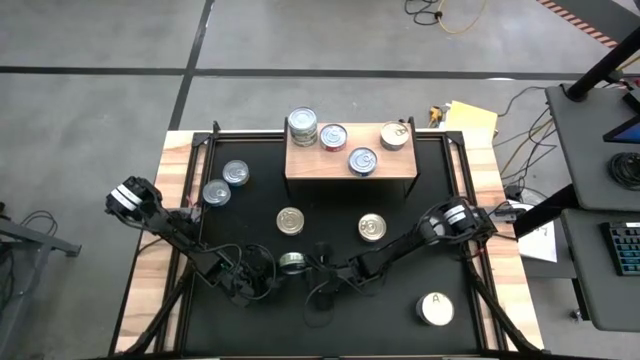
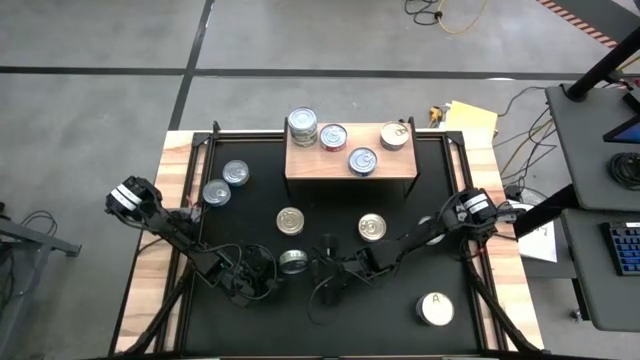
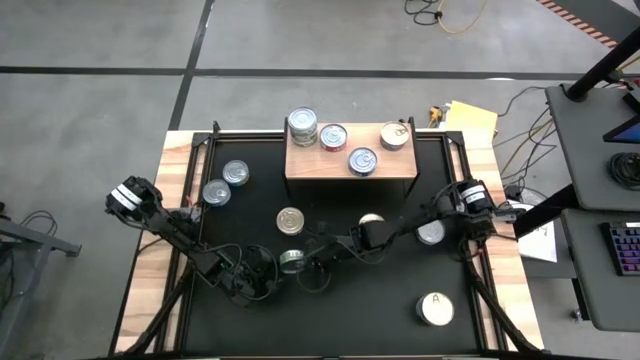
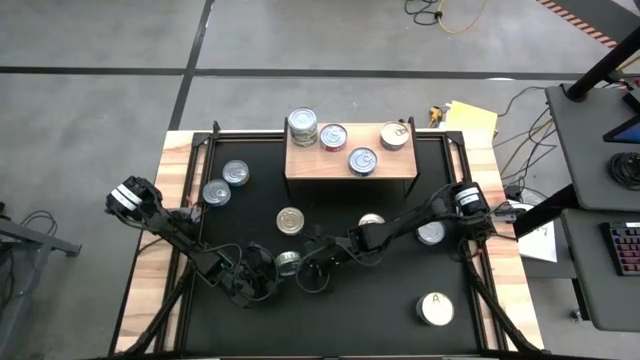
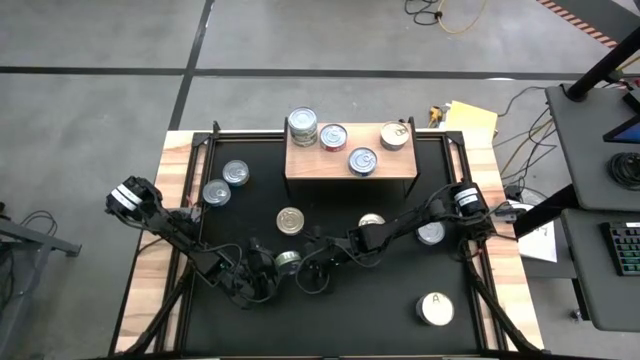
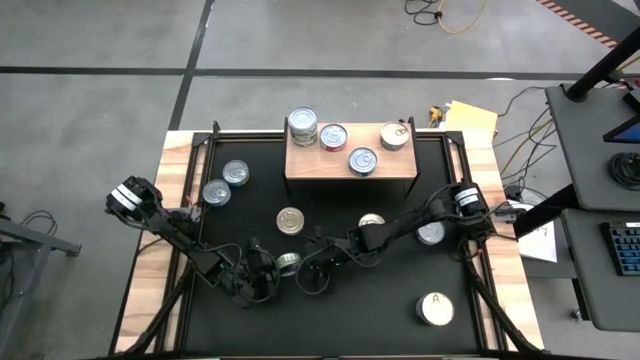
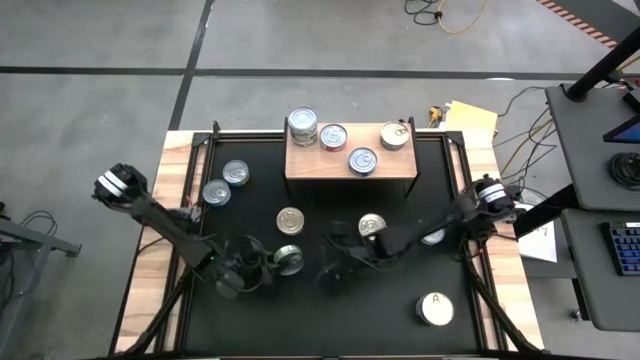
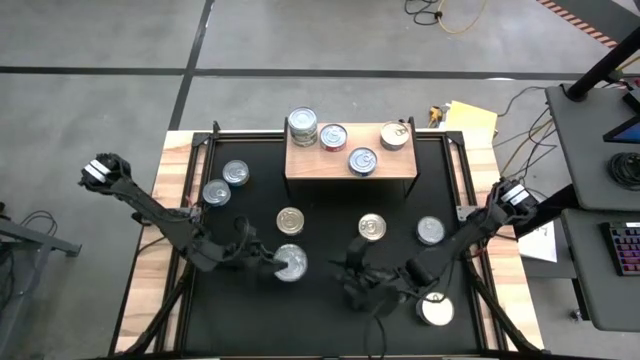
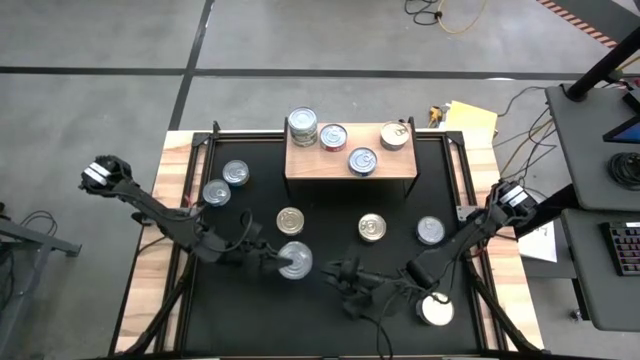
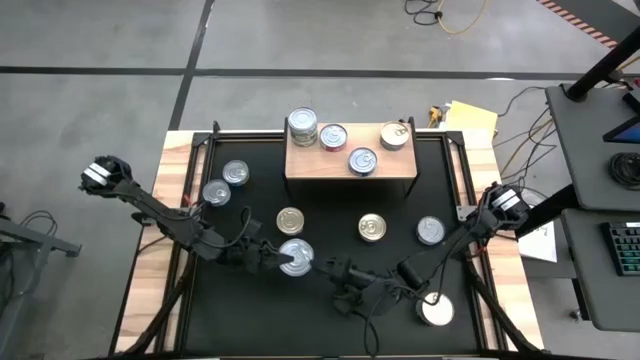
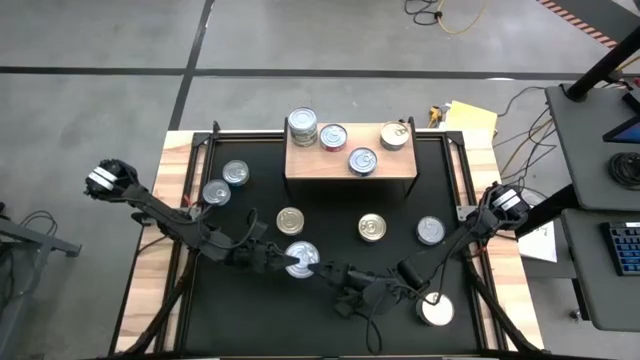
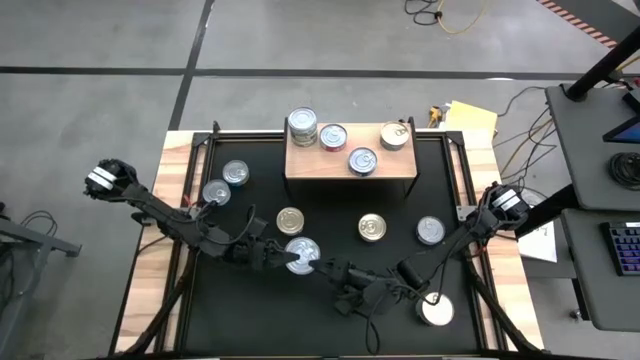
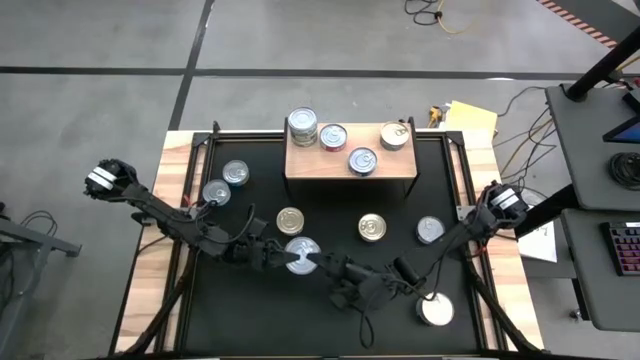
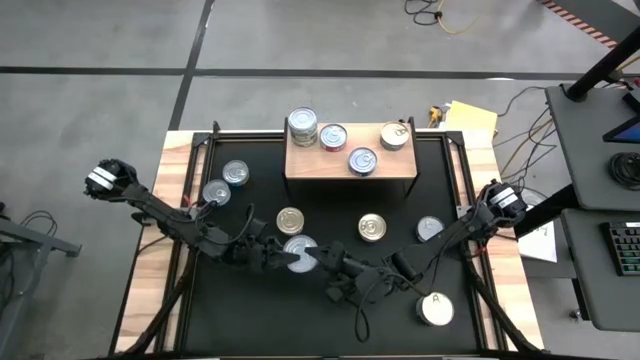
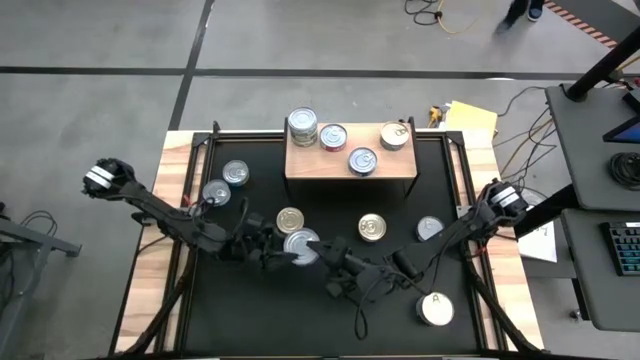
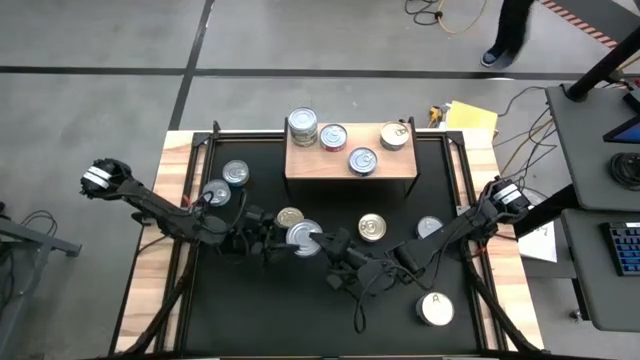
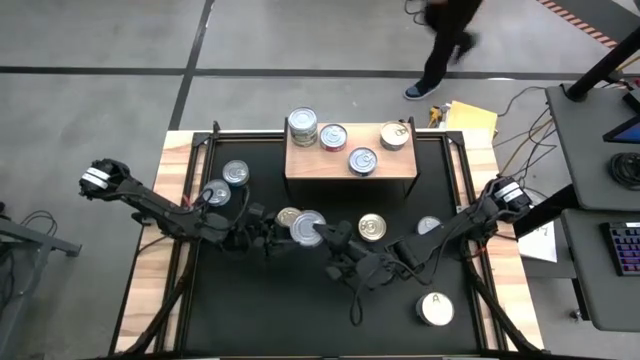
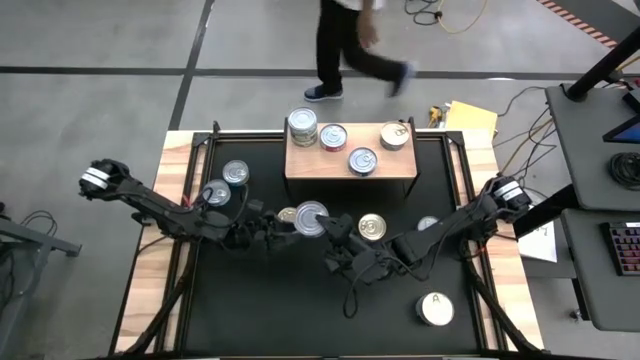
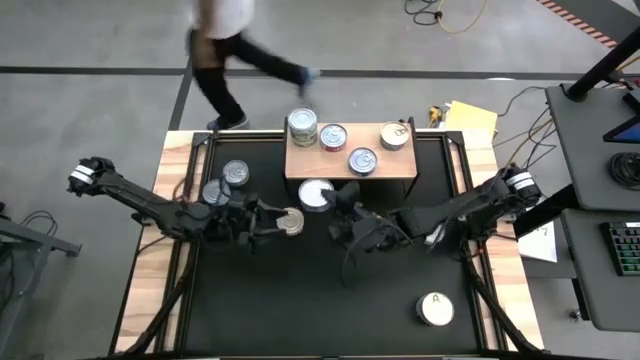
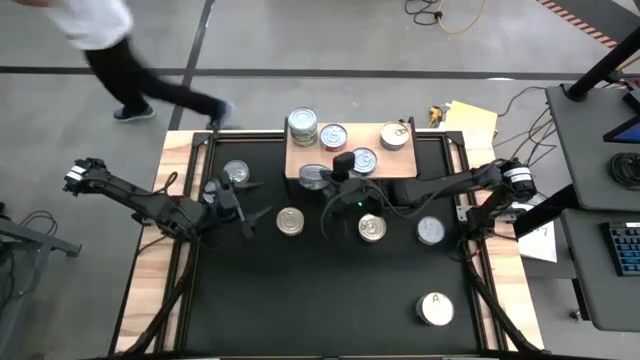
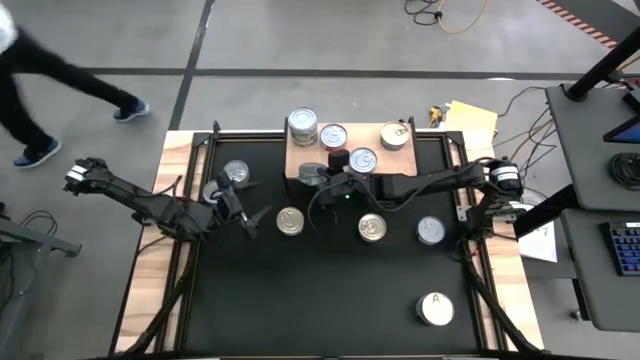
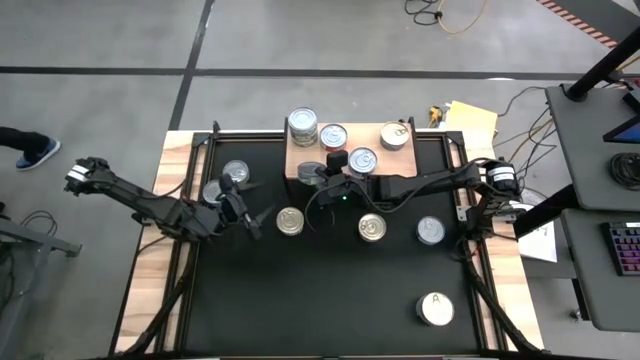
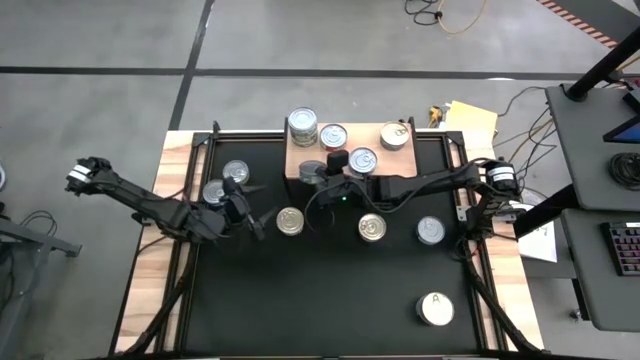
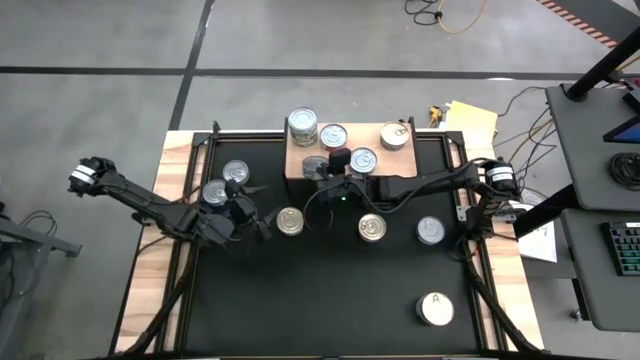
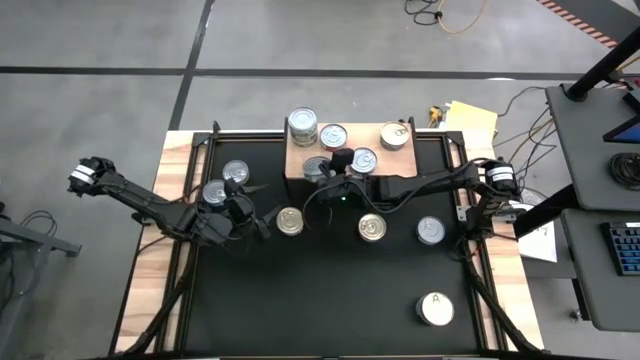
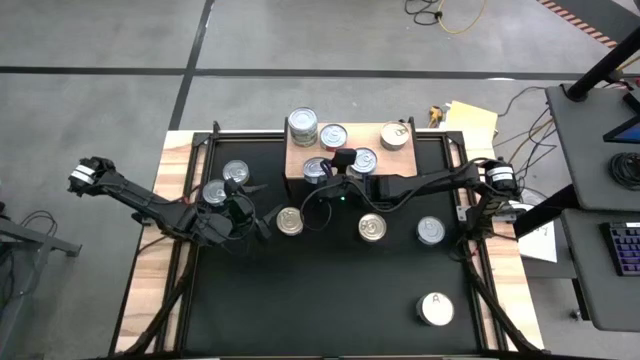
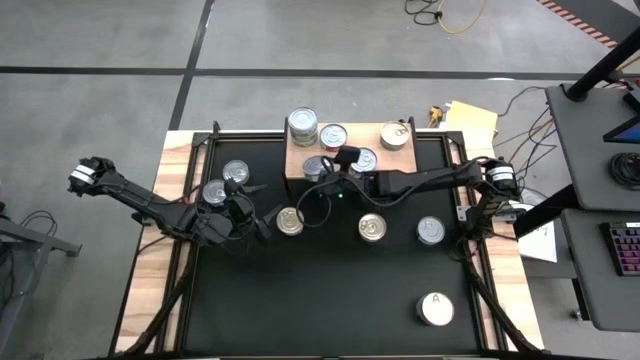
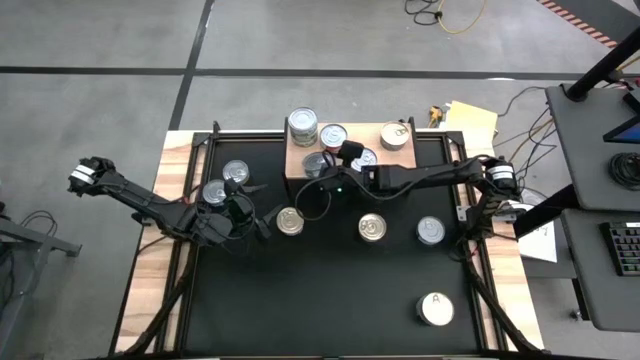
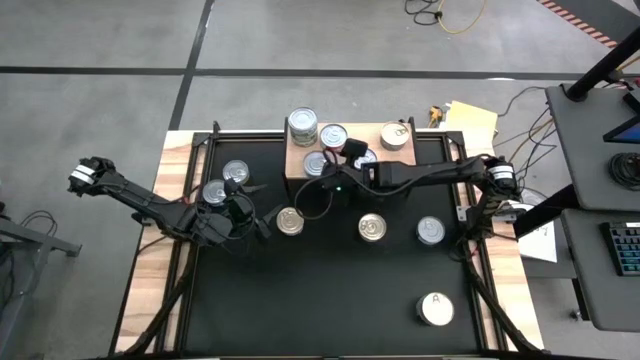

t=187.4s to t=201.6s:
Task: Stack canned seafood by type on shelf
Put the green tuna can on the shelf

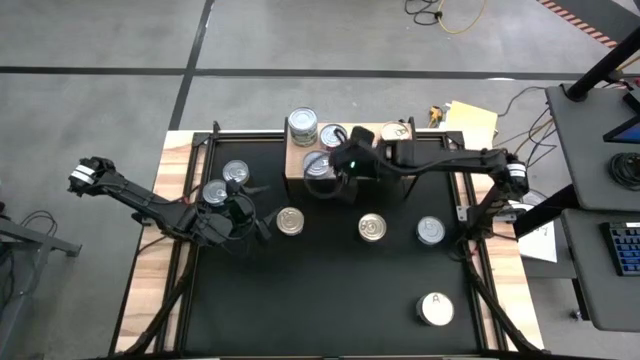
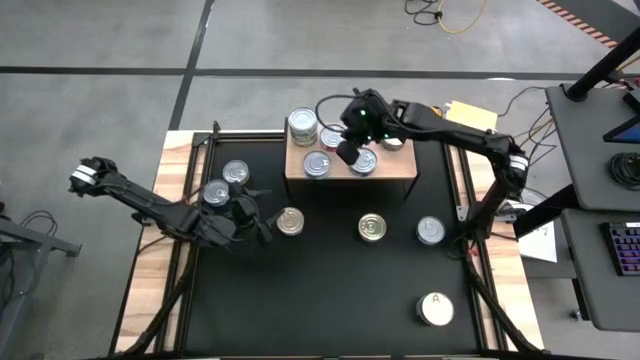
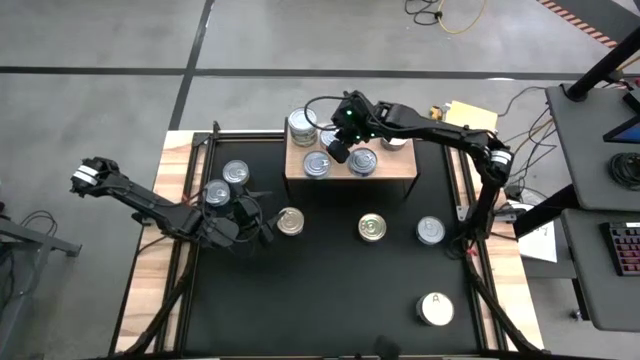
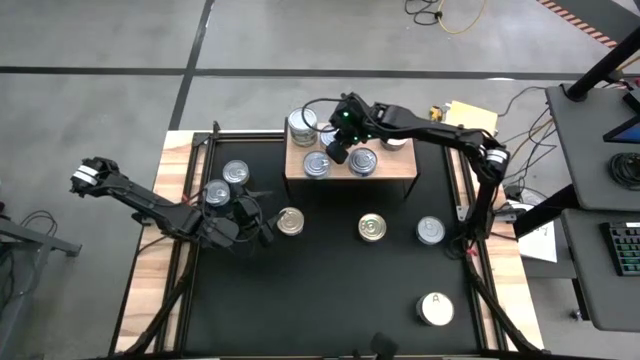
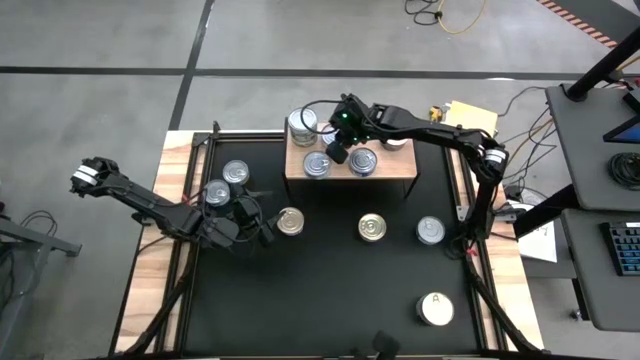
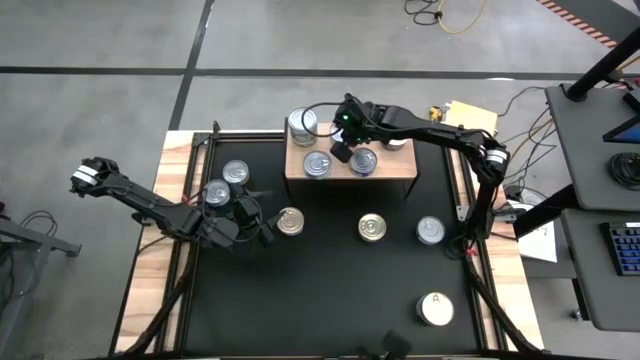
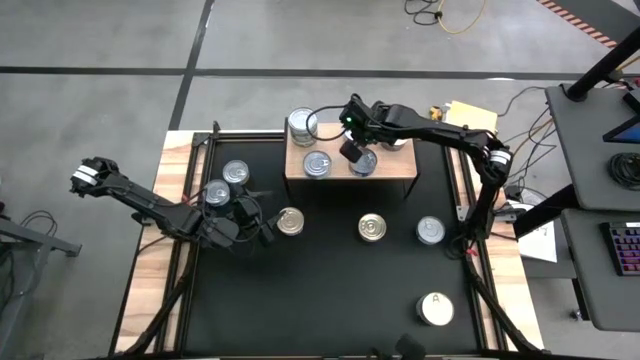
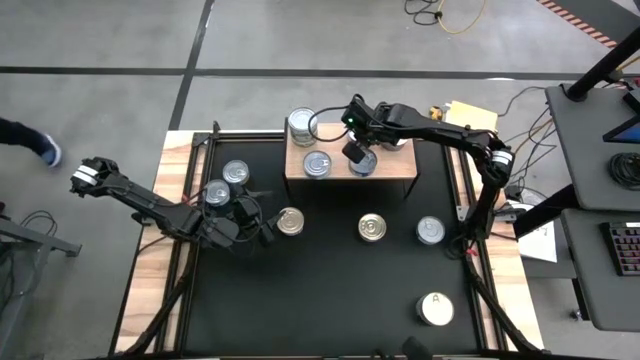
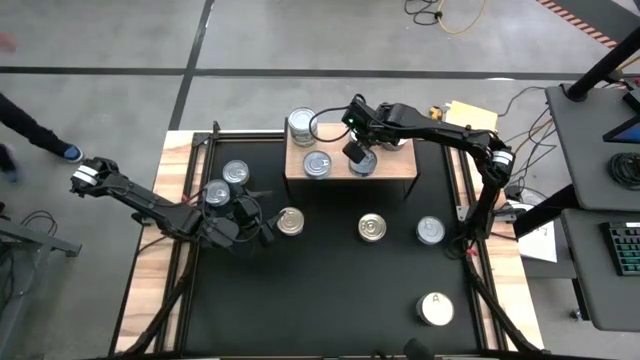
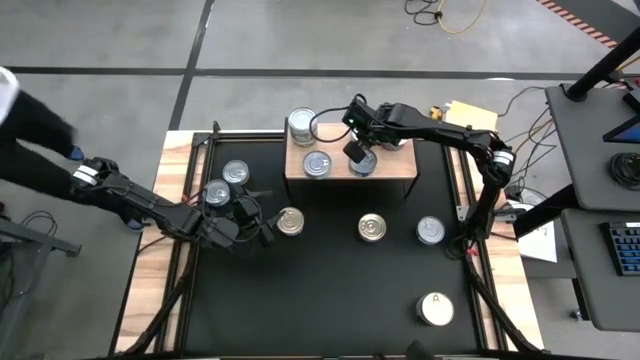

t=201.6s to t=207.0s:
Adjust the red tuna can on the shelf

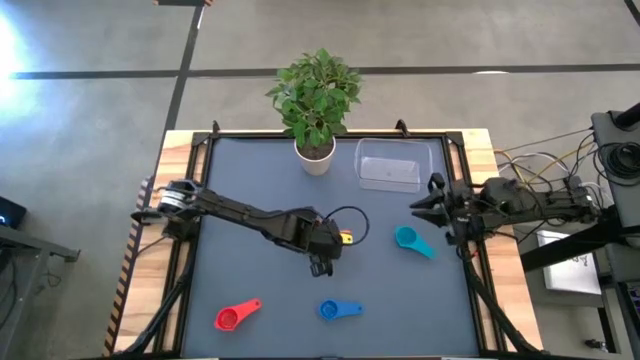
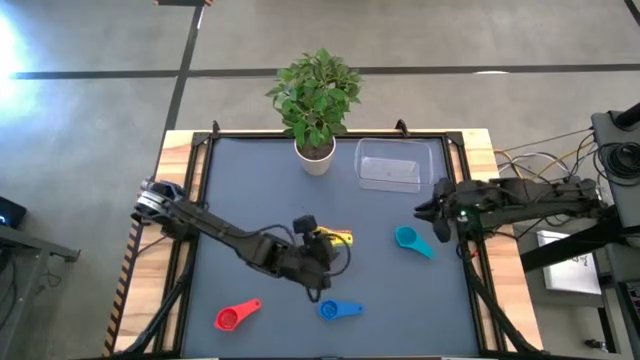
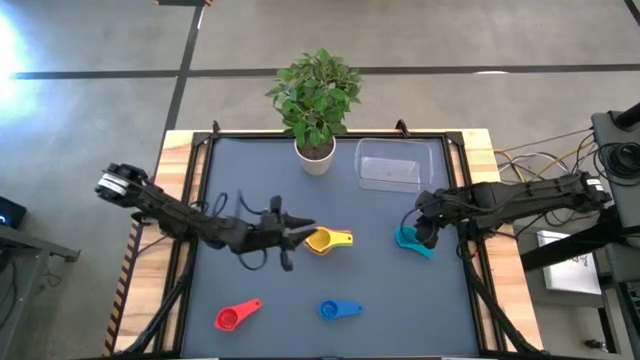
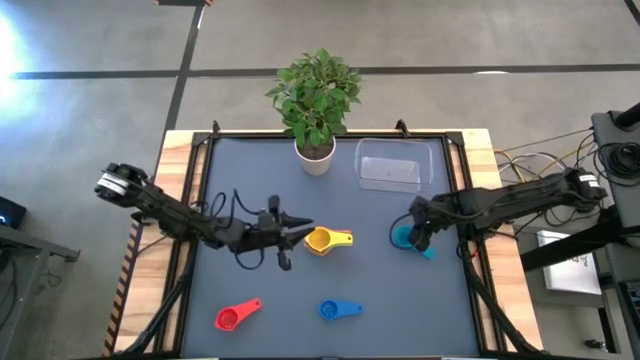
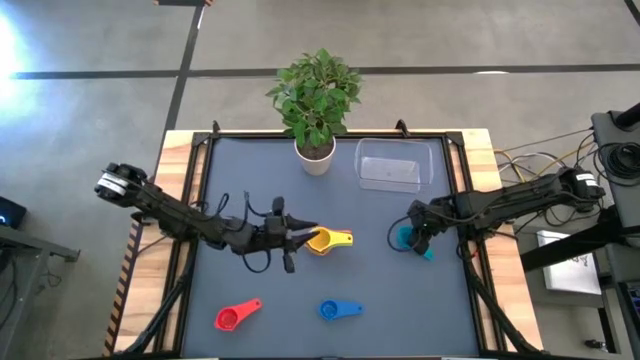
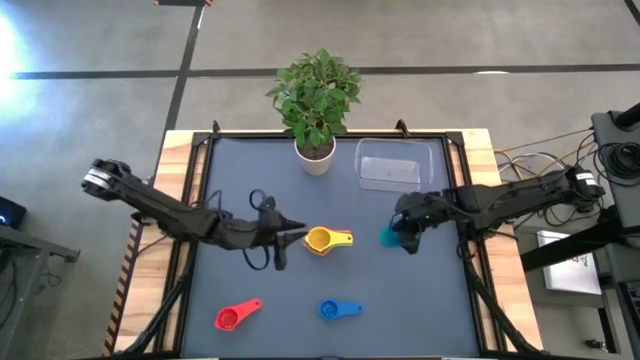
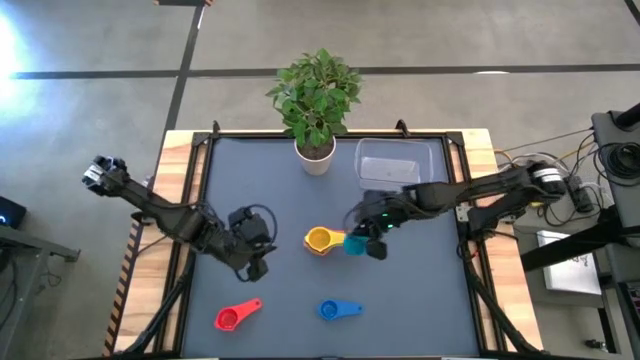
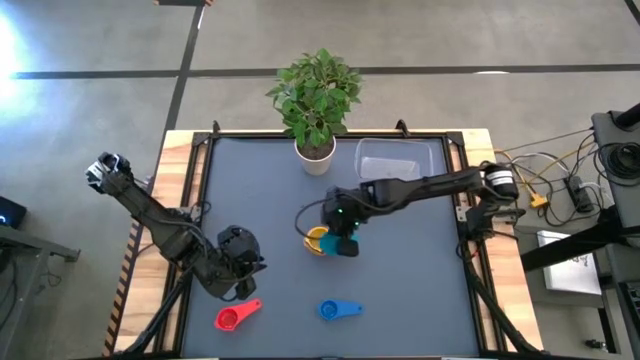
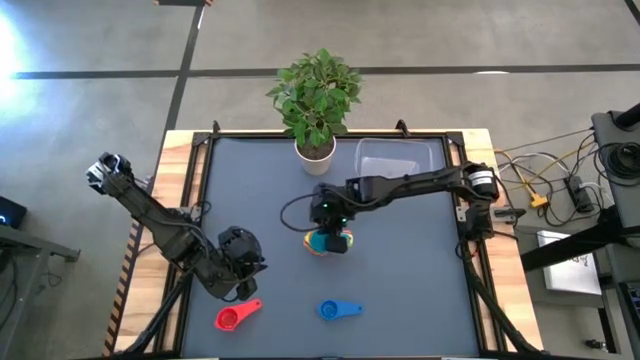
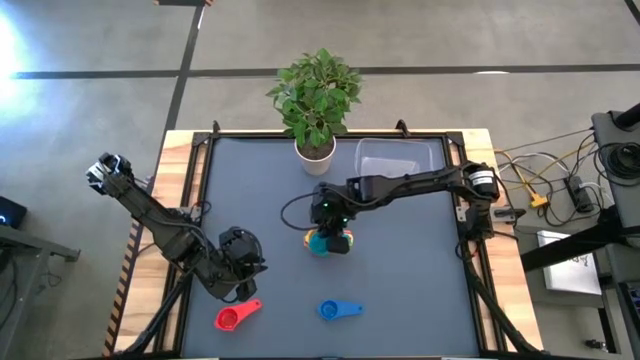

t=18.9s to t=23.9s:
Task: Nest measuring cups in basket
Stack the light blue measuring cup on top of the yellow measuring cup
